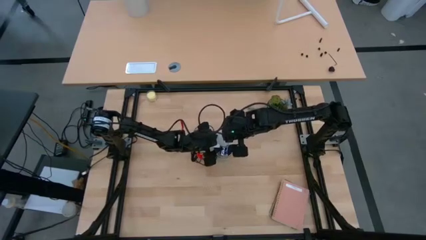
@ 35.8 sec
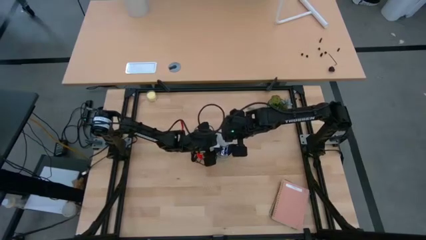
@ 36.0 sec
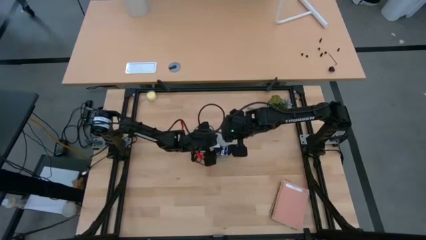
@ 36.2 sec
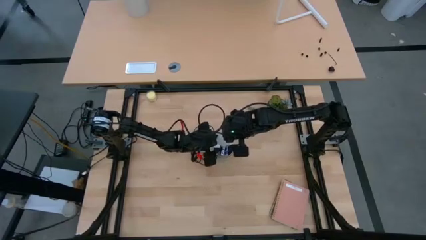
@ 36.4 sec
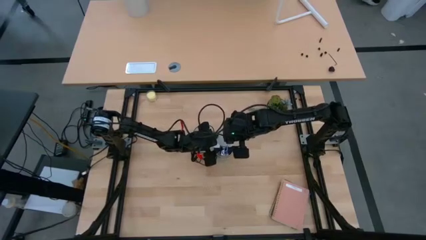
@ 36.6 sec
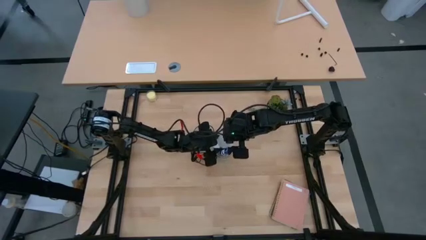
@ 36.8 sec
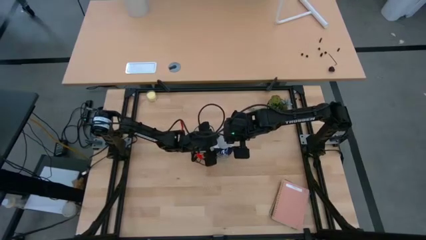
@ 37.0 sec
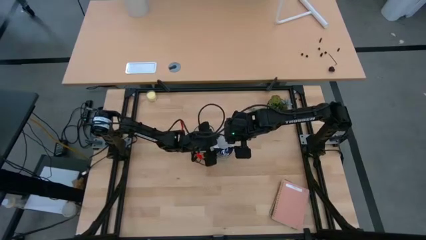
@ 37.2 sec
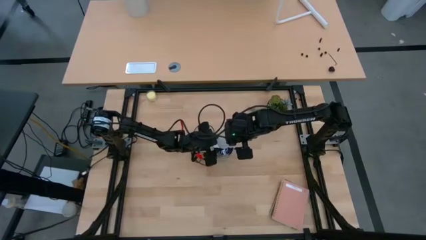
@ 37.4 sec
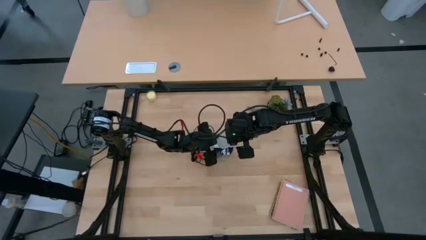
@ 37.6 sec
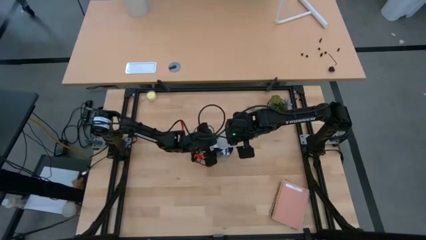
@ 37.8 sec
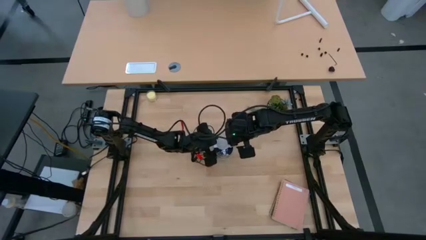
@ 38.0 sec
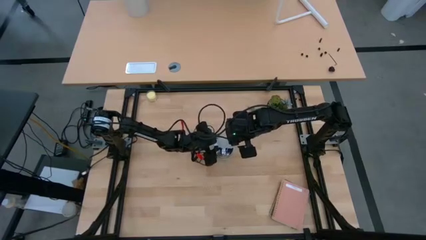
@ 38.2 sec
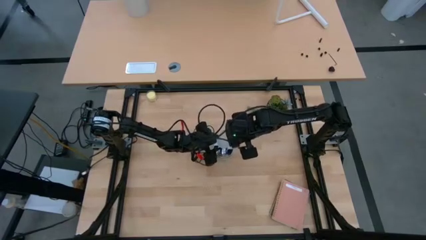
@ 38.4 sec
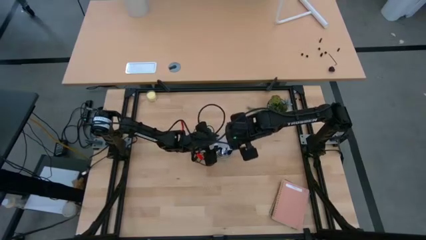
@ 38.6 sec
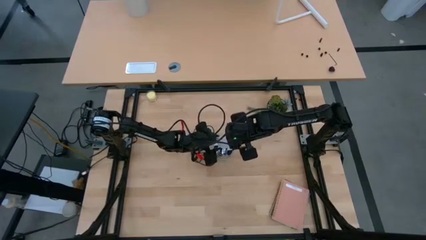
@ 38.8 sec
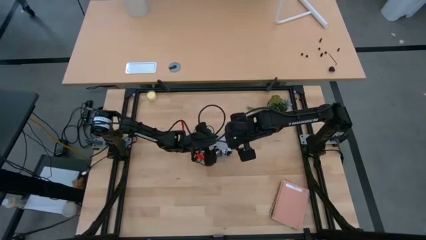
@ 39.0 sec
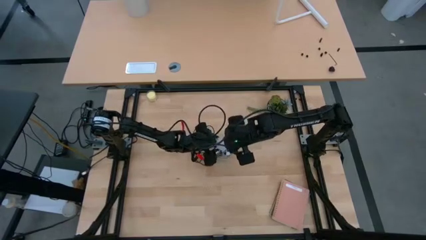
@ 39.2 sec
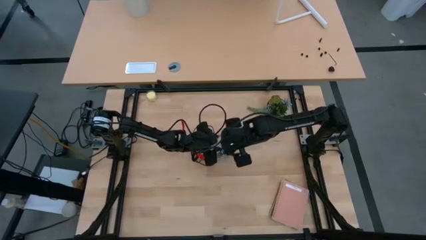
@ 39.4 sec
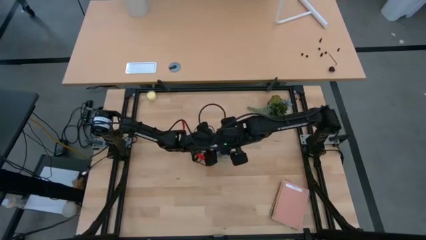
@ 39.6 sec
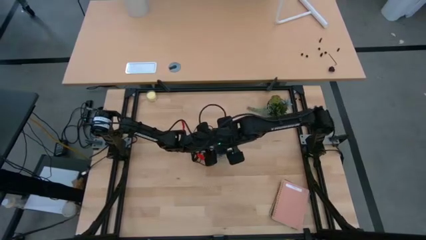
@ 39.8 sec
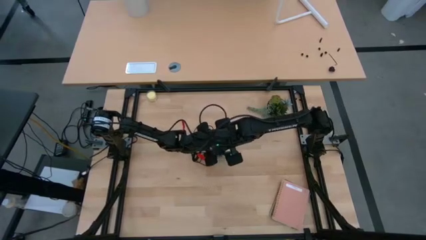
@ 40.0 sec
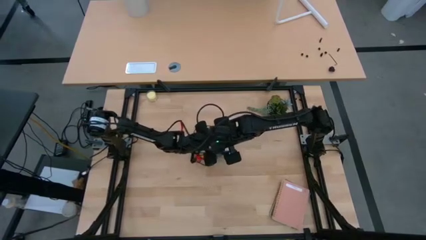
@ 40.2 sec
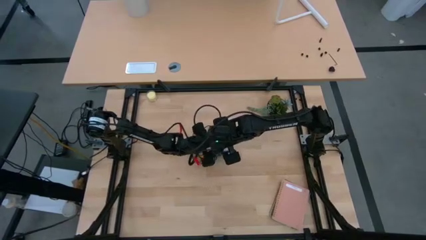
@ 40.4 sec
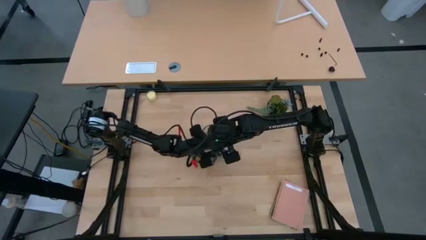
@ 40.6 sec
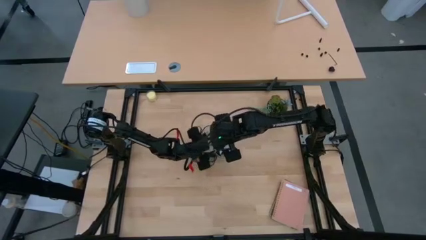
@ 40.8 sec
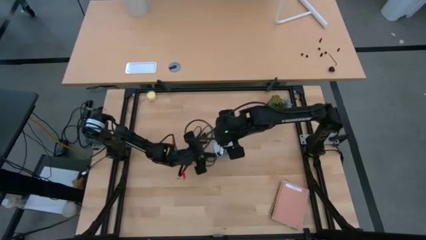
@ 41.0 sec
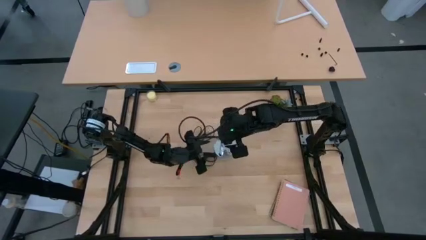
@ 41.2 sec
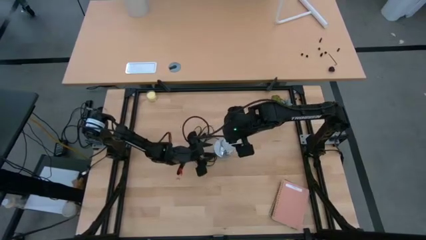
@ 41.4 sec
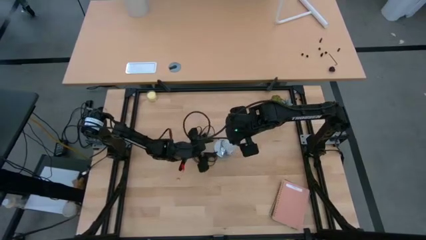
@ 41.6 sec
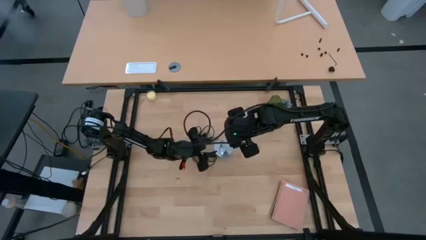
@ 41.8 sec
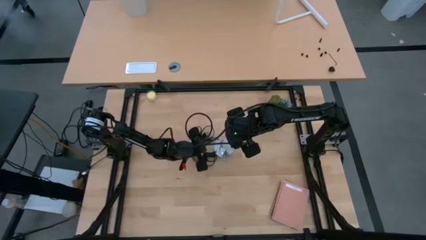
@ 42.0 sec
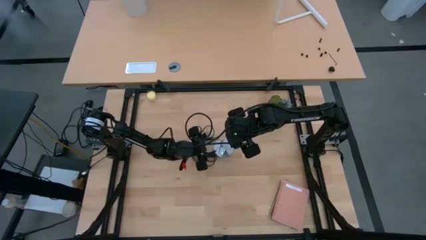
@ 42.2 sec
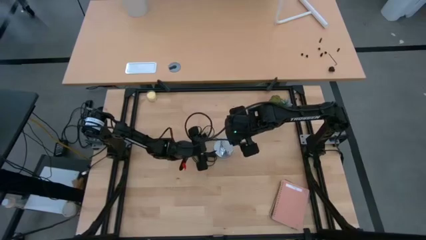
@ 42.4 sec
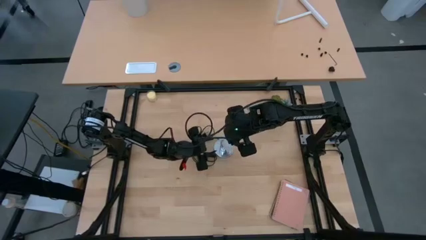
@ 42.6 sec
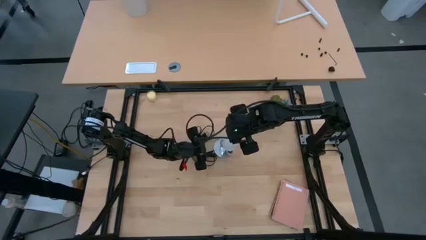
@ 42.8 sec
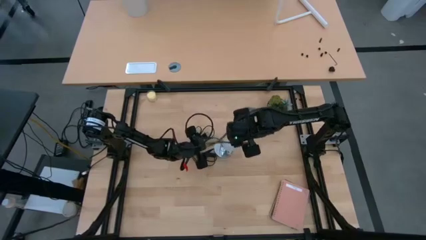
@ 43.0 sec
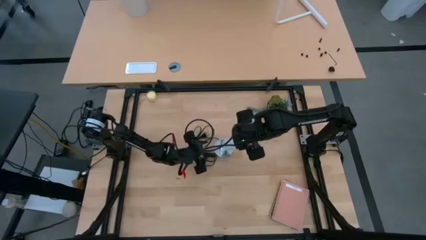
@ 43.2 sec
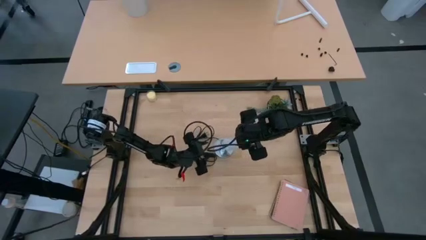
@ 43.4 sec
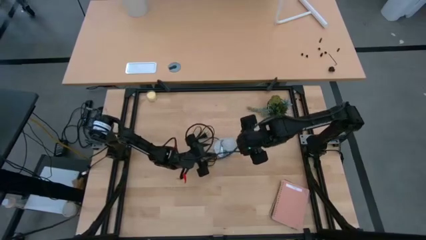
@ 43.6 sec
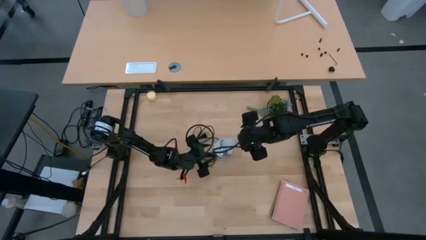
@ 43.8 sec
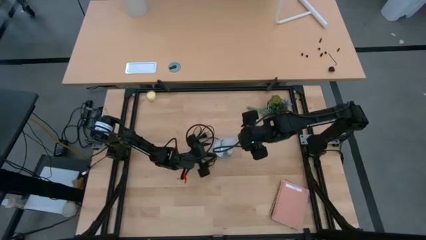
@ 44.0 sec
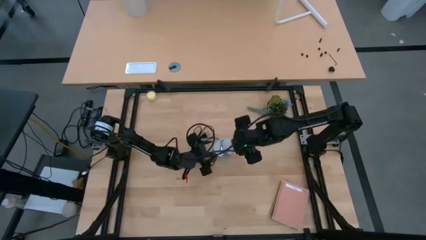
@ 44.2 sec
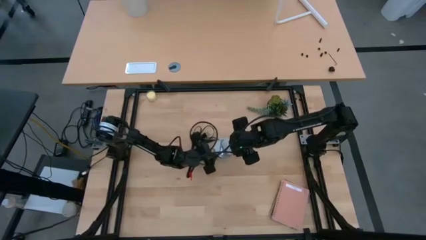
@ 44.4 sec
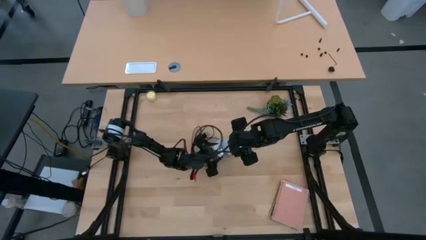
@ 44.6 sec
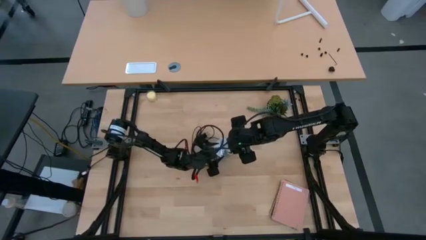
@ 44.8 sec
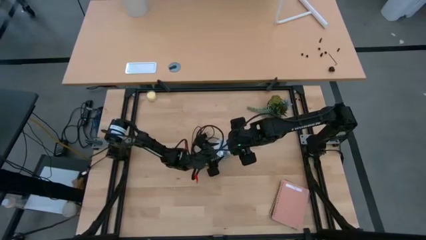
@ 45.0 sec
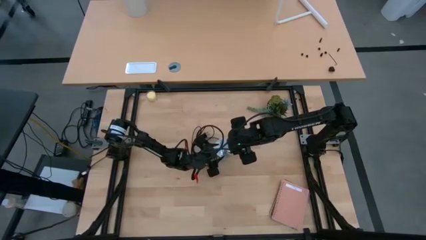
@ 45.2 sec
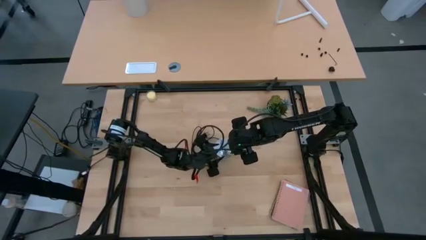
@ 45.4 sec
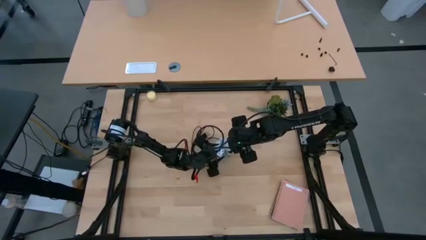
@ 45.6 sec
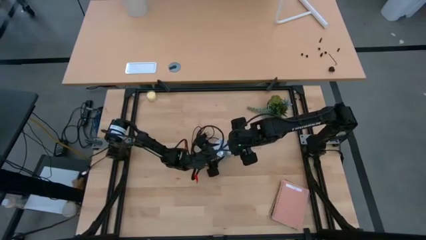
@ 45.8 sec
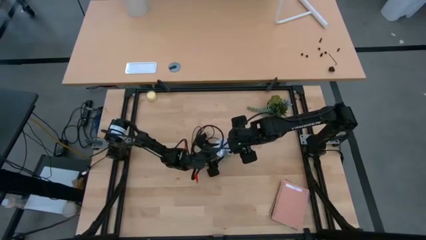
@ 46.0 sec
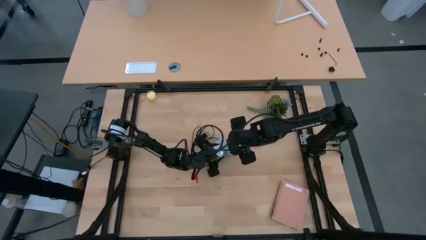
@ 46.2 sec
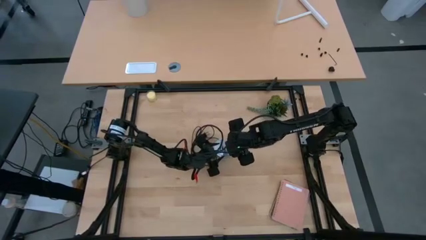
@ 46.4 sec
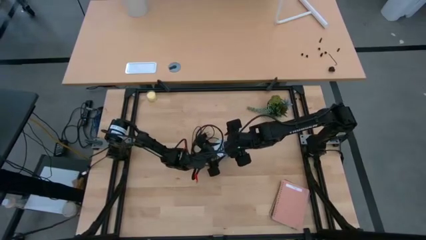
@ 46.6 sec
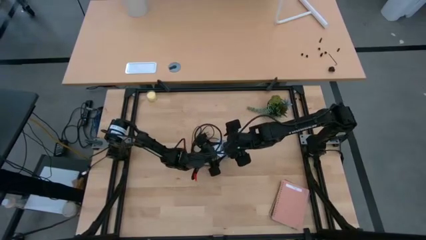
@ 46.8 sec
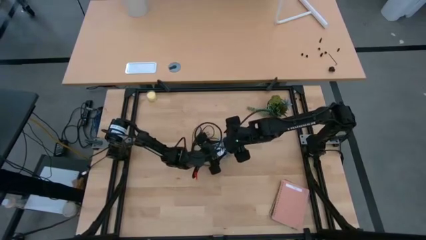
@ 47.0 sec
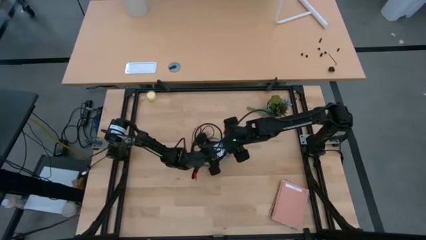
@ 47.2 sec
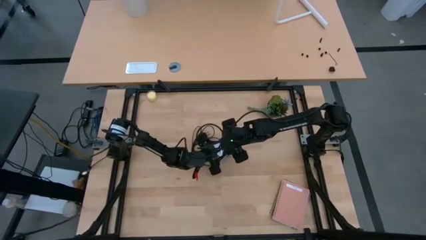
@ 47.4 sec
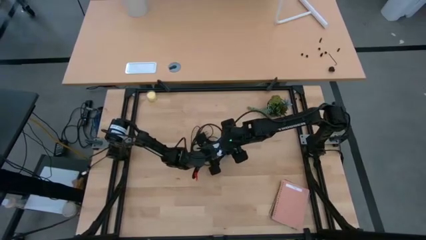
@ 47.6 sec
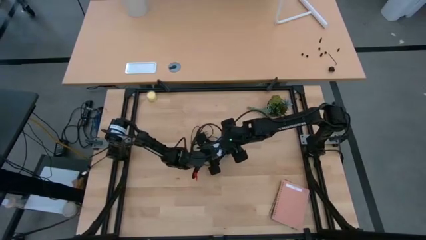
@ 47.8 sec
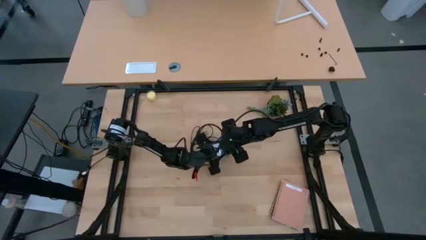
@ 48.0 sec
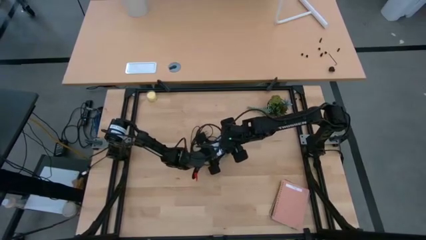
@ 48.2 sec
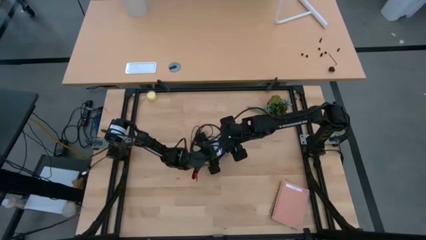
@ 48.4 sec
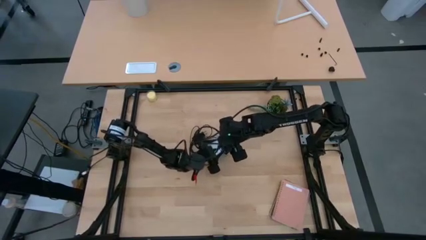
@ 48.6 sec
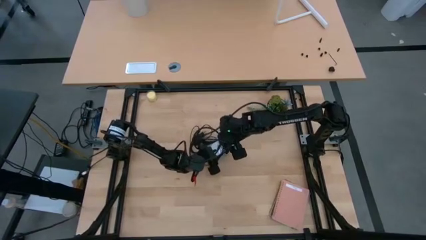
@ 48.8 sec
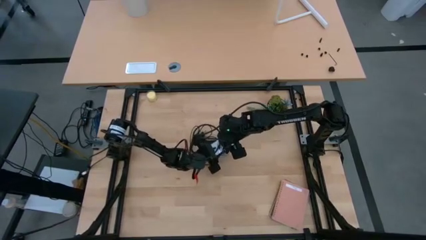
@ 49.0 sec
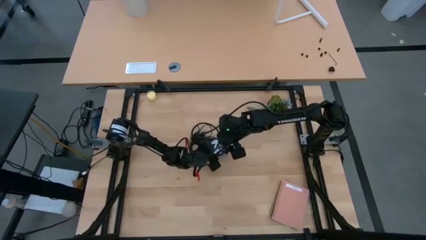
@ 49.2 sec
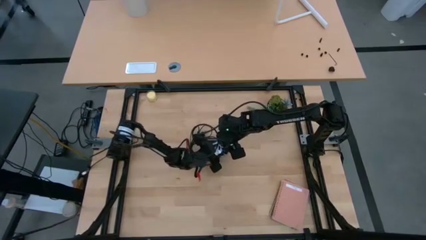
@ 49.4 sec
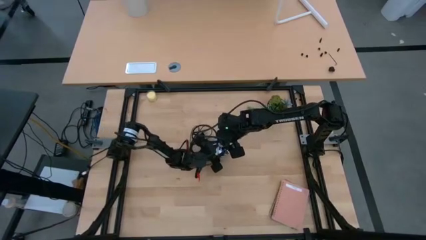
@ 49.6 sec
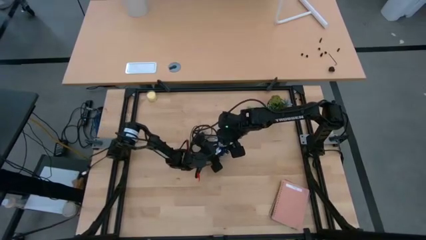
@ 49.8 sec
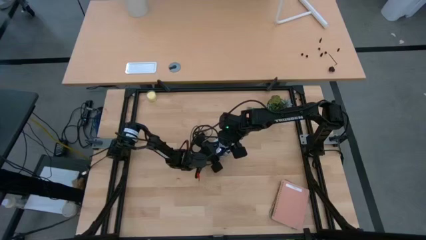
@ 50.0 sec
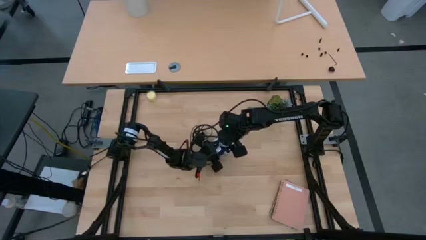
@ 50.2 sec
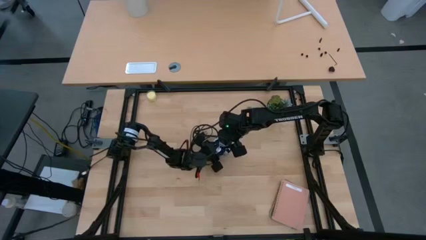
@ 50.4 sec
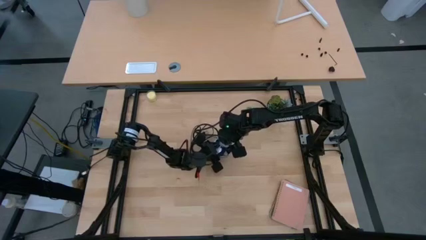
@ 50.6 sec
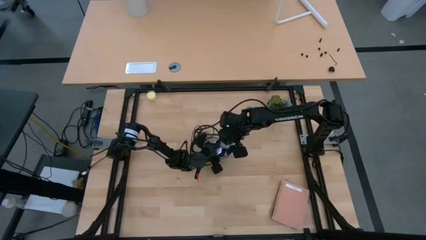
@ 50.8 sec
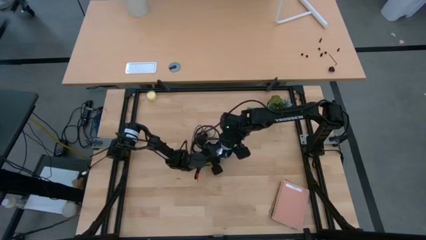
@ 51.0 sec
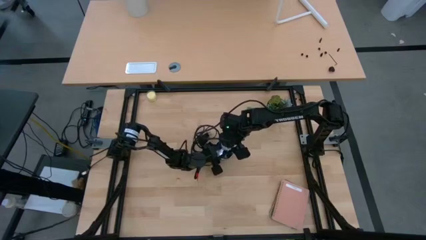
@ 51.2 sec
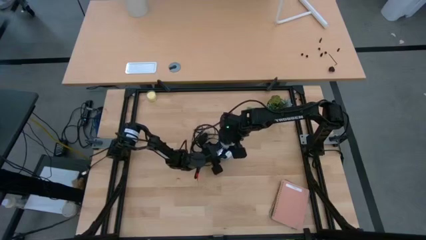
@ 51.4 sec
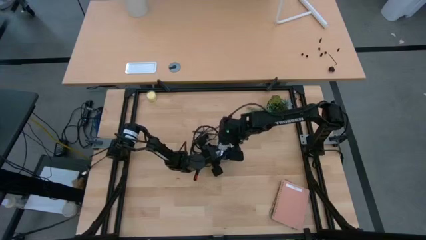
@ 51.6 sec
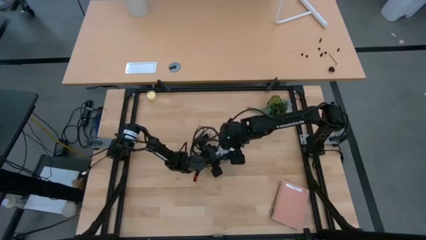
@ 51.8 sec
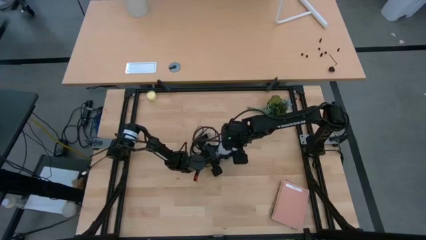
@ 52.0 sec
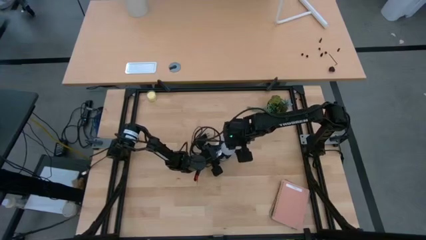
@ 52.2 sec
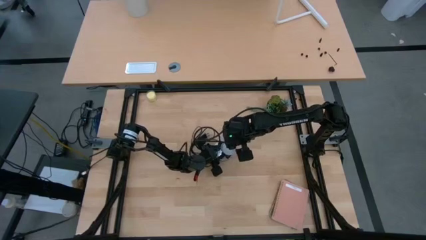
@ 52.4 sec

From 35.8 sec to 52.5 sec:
Task: Screw lightbulb
Insert the white lightbulb into the metallic lamp
